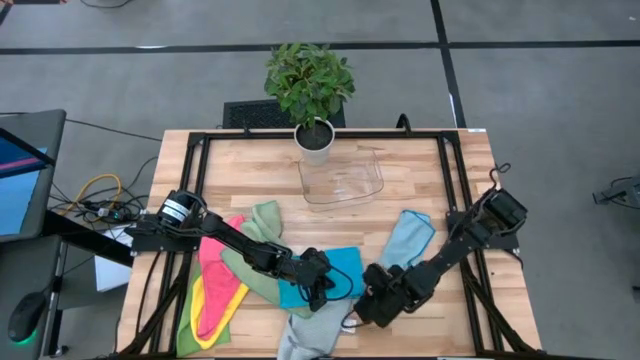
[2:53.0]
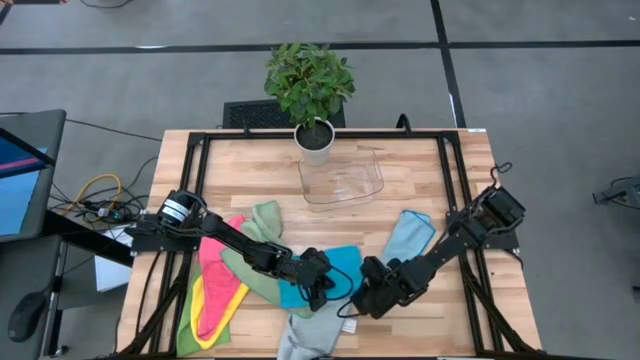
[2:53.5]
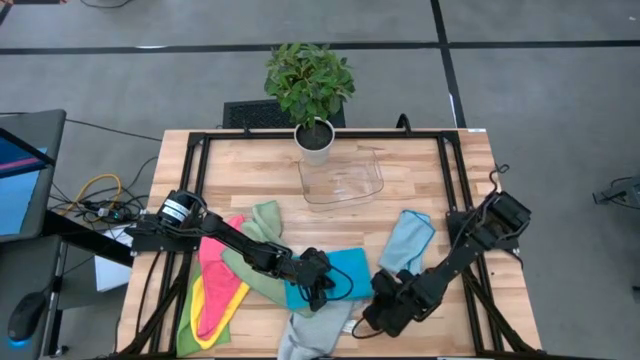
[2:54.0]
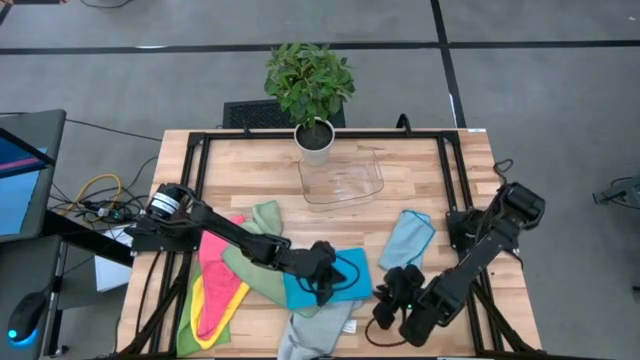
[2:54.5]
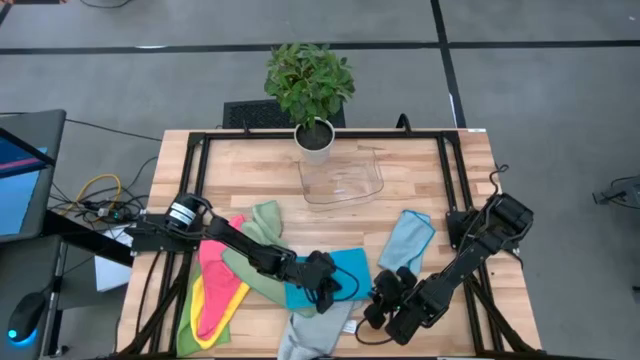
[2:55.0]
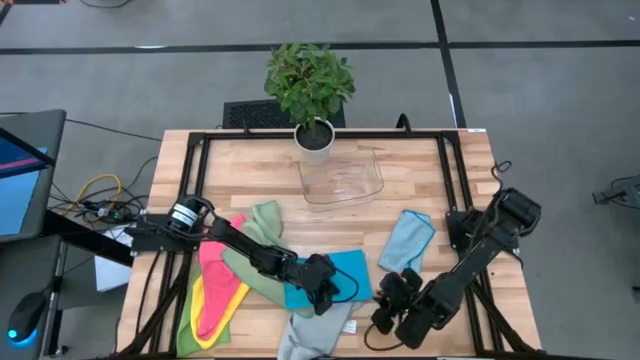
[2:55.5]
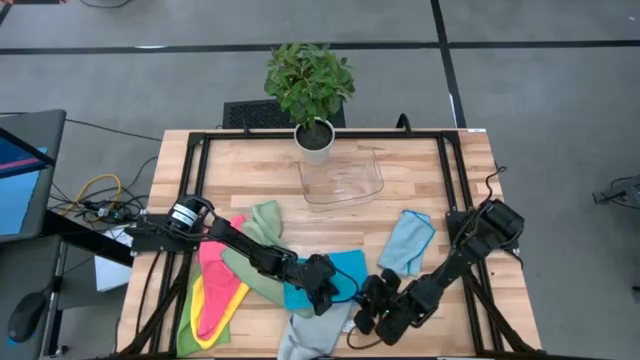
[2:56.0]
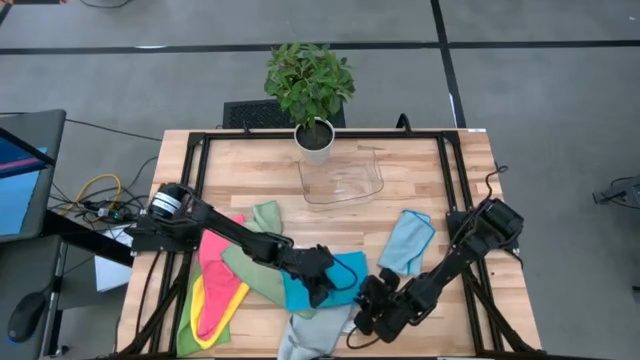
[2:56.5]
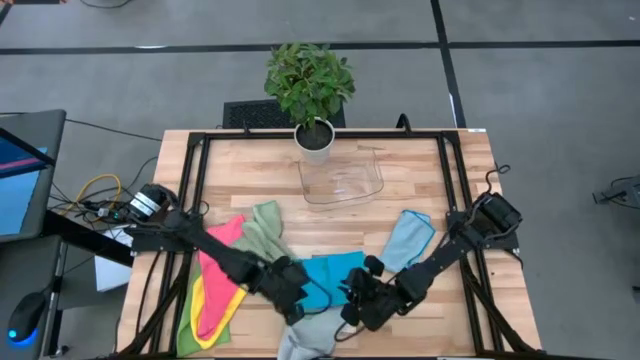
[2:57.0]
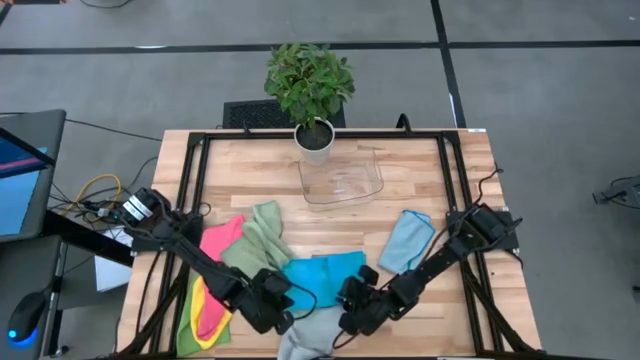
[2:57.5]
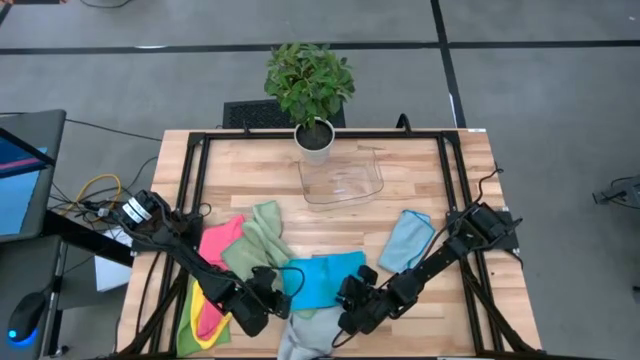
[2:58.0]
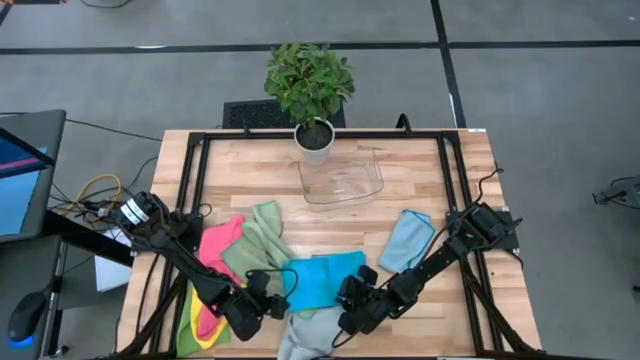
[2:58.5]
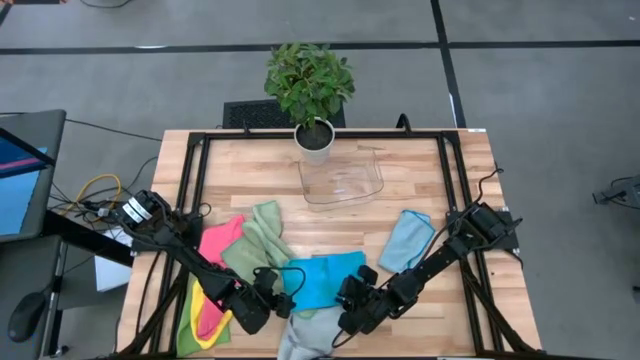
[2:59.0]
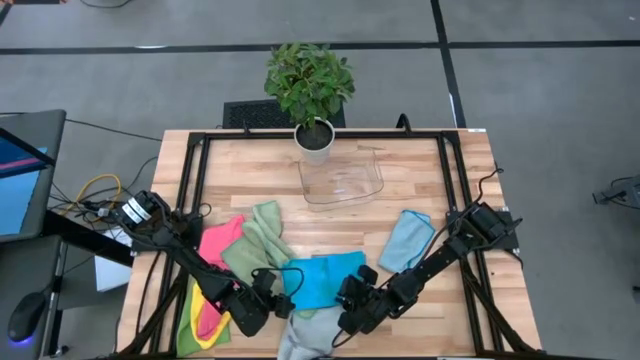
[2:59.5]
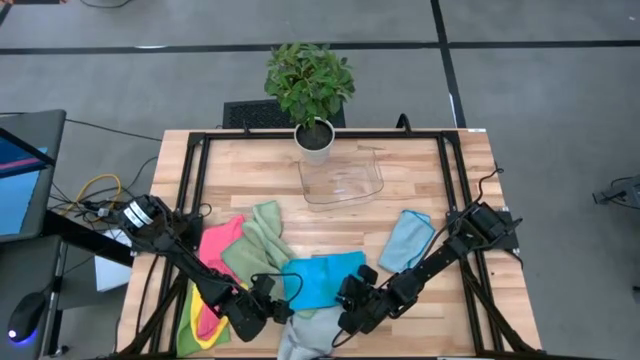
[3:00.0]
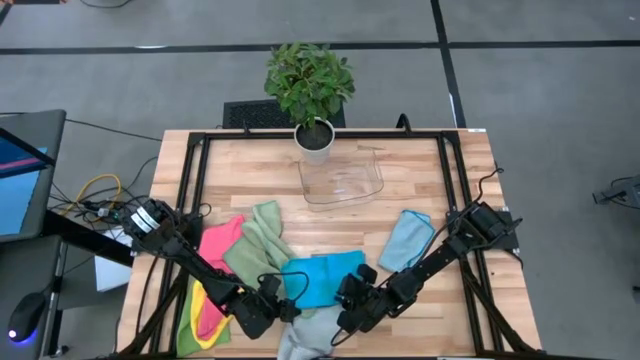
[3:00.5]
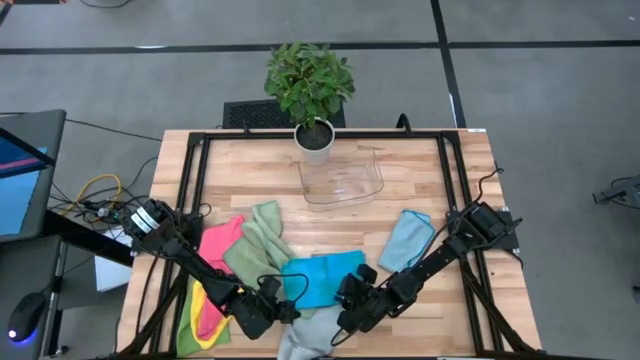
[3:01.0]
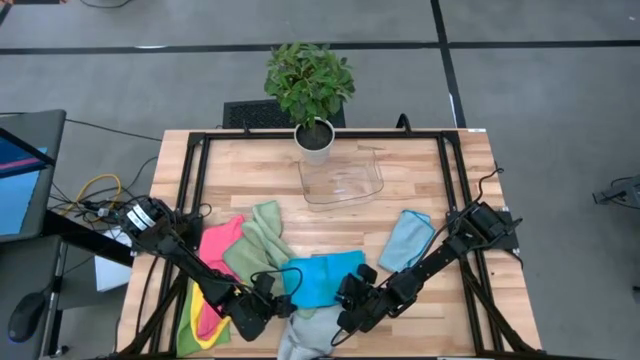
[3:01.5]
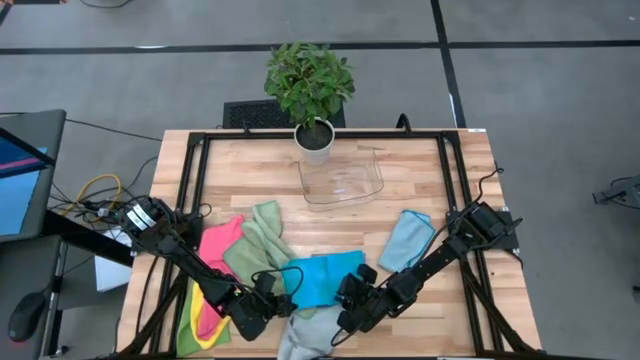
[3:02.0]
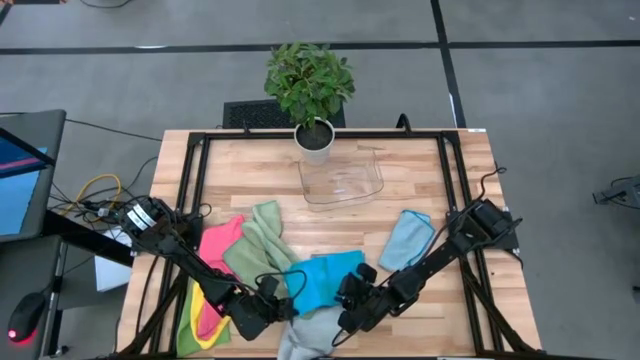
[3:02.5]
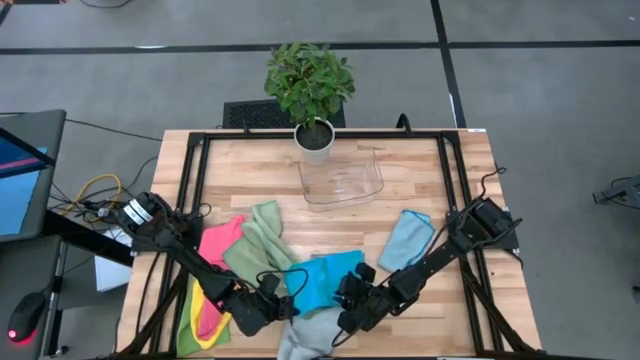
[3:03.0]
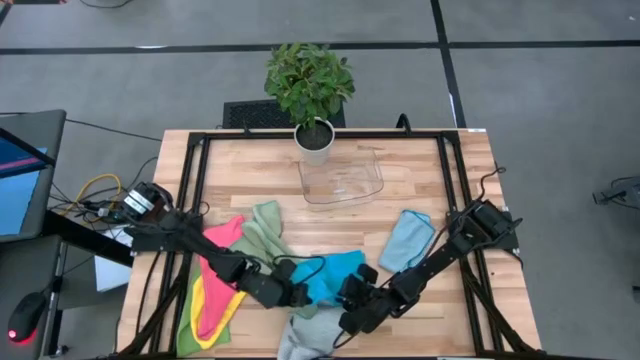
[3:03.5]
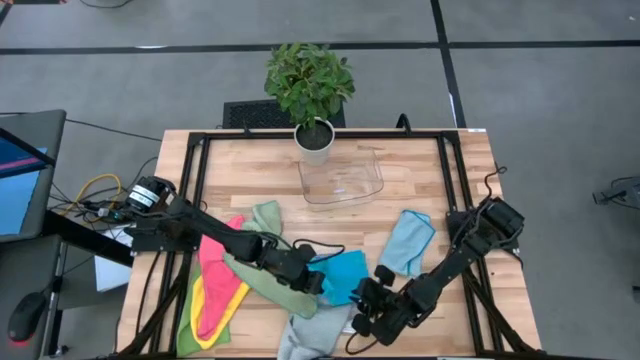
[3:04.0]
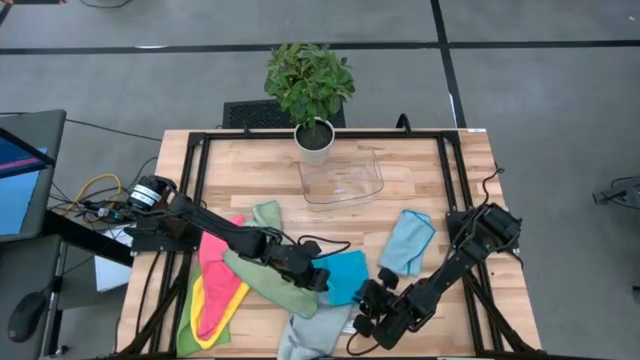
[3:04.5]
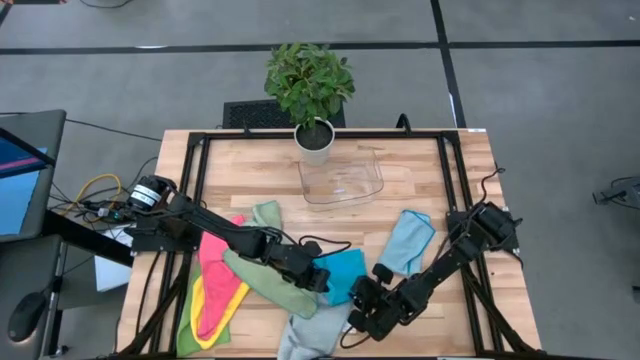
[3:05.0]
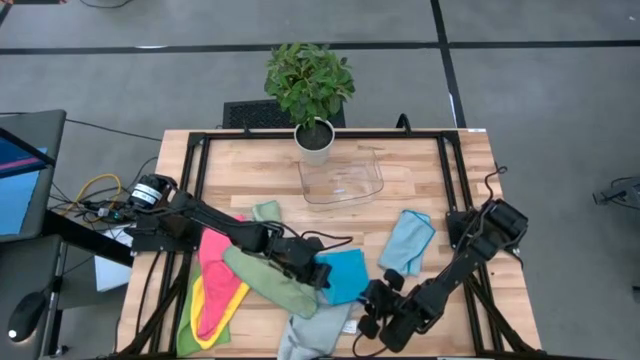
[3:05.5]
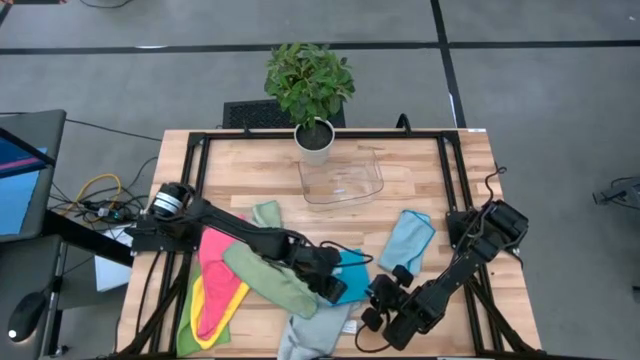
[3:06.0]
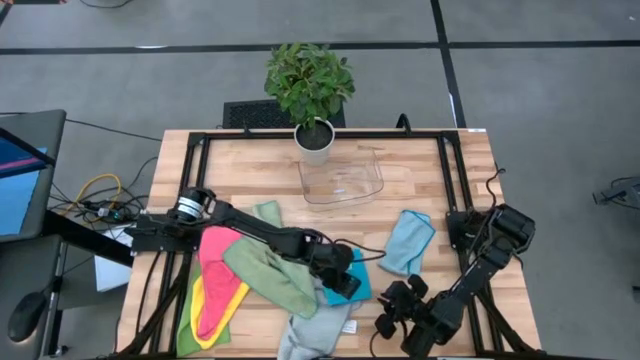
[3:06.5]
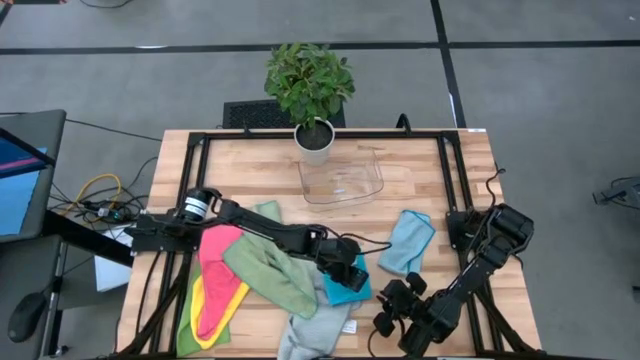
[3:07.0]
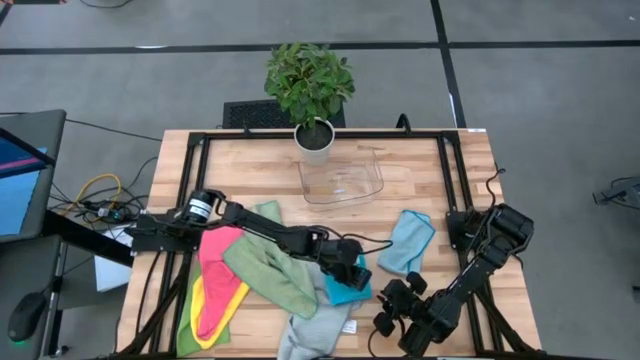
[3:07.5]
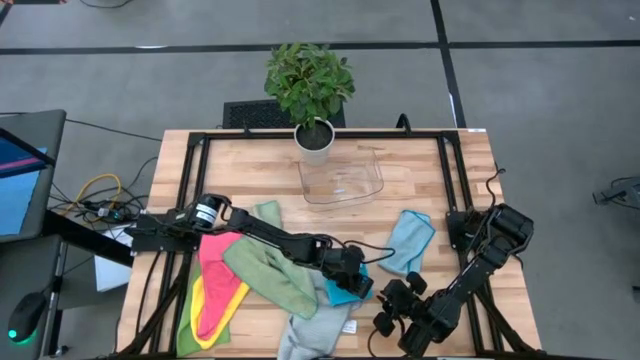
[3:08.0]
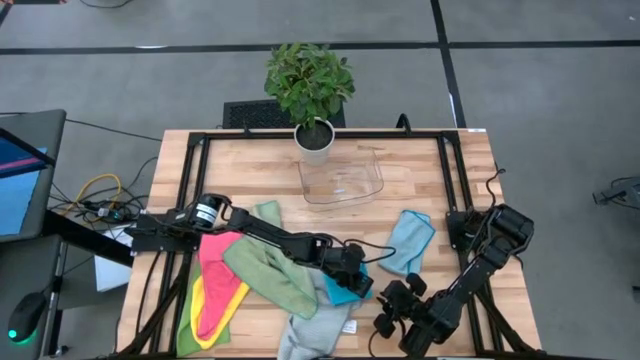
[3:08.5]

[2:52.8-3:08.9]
Task: Fold microfiber towels
Fold the blue microfiber cloth
